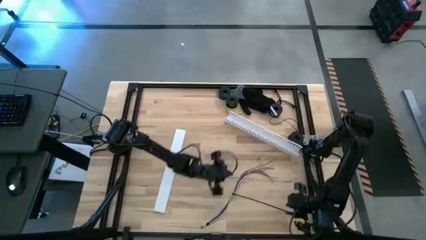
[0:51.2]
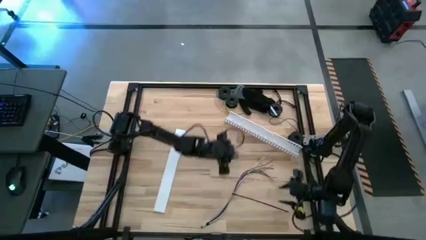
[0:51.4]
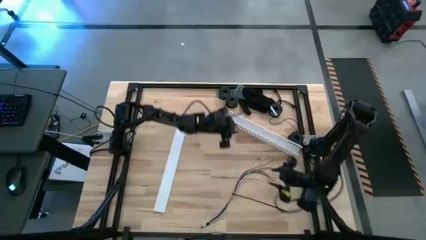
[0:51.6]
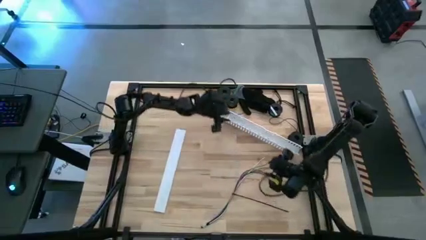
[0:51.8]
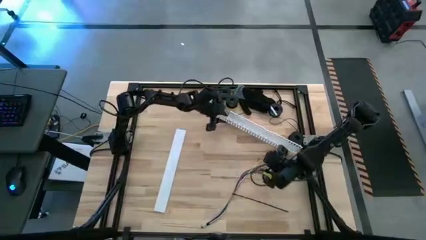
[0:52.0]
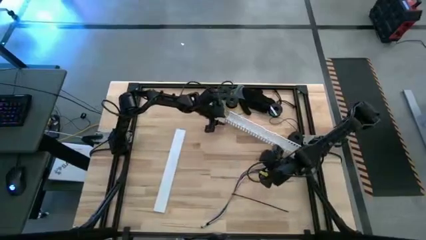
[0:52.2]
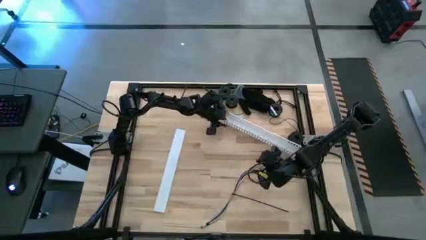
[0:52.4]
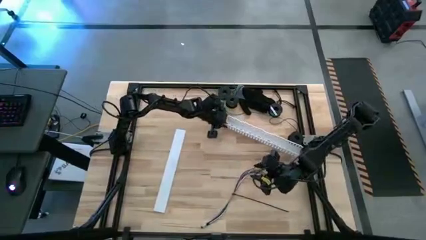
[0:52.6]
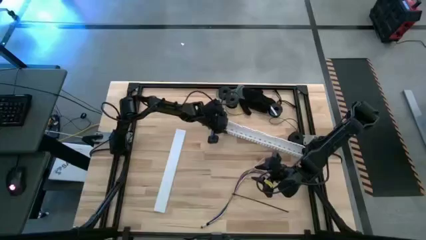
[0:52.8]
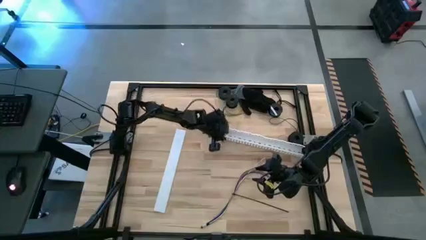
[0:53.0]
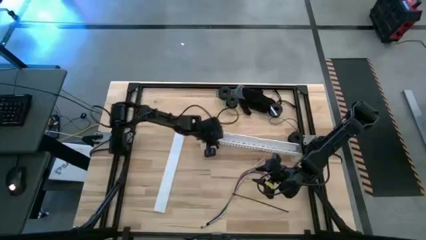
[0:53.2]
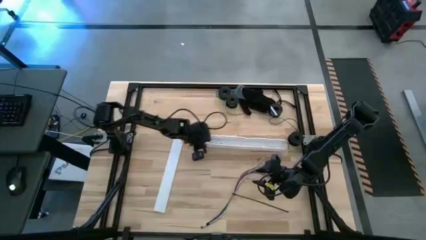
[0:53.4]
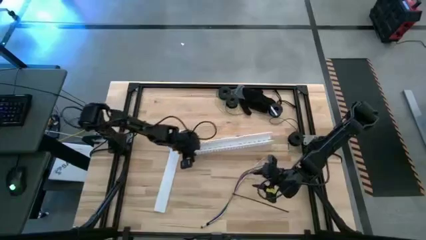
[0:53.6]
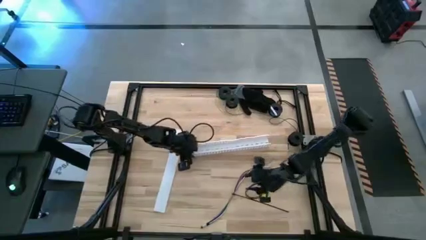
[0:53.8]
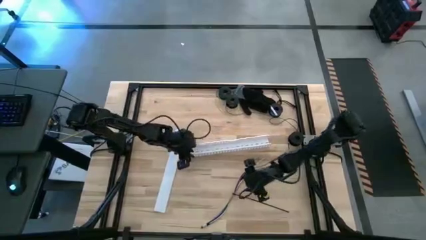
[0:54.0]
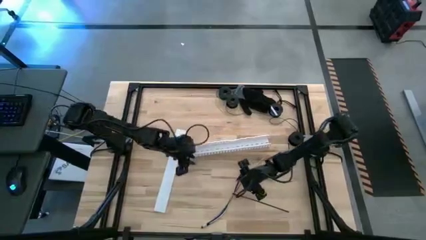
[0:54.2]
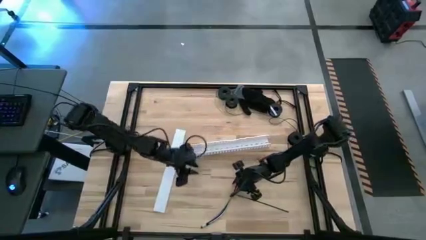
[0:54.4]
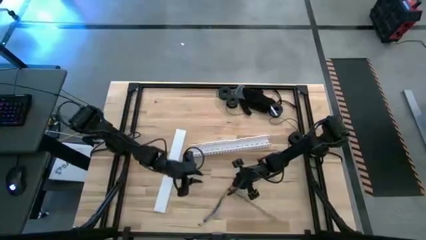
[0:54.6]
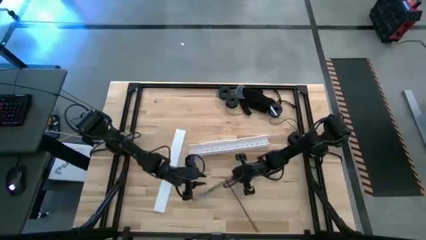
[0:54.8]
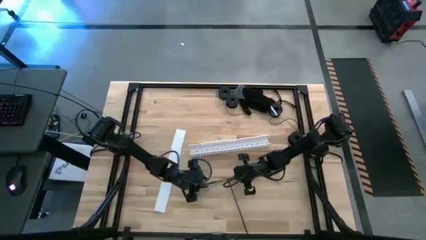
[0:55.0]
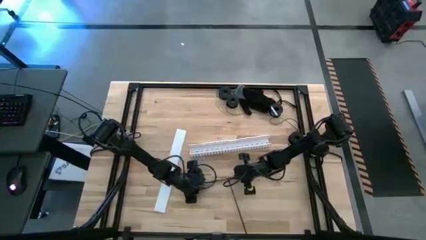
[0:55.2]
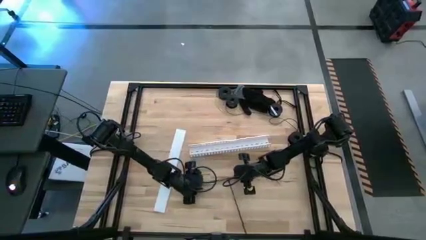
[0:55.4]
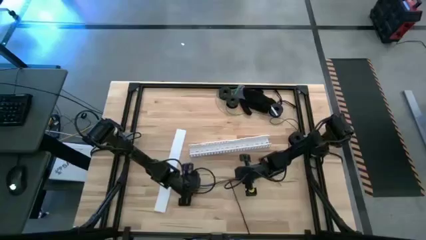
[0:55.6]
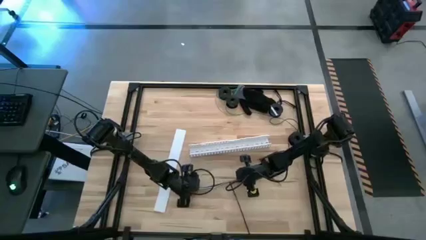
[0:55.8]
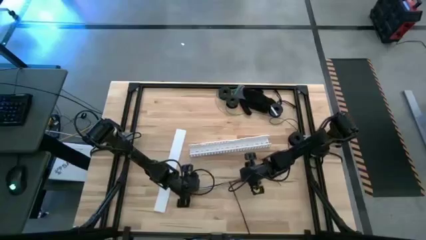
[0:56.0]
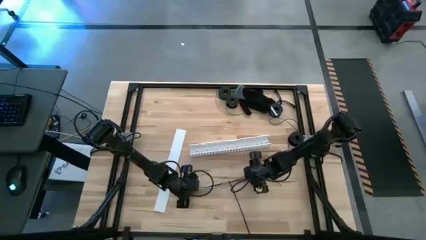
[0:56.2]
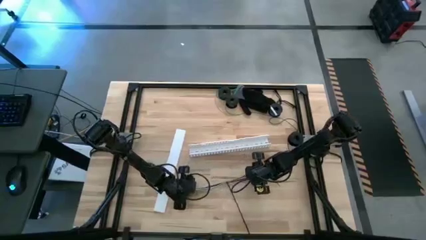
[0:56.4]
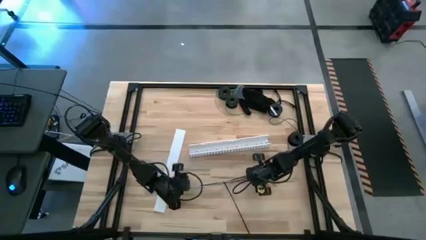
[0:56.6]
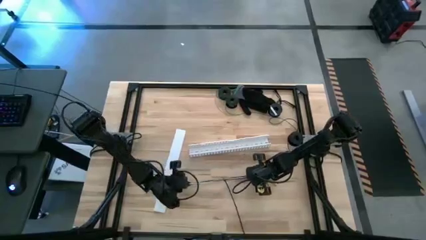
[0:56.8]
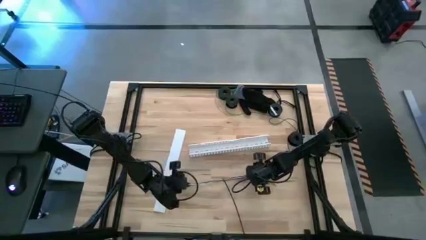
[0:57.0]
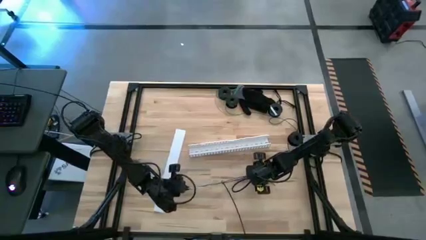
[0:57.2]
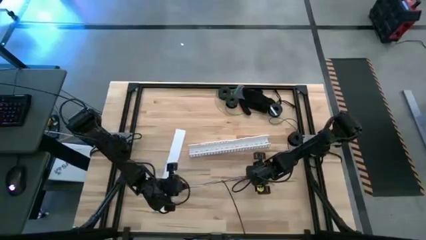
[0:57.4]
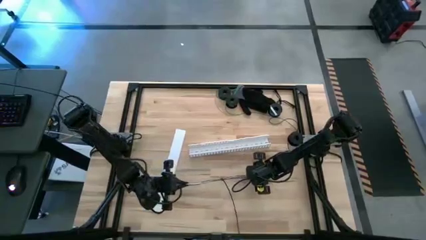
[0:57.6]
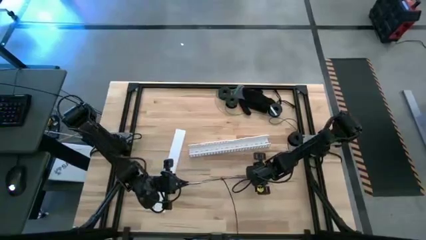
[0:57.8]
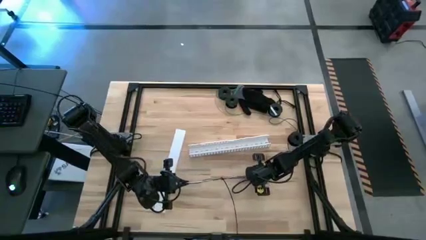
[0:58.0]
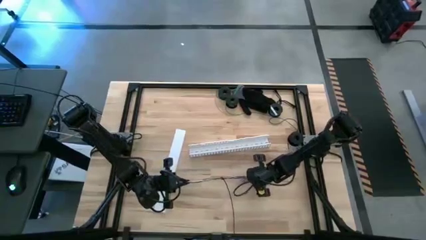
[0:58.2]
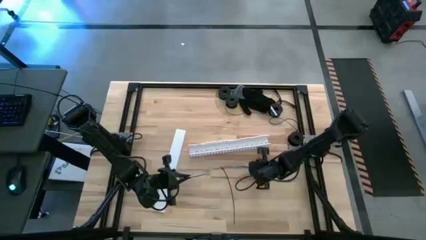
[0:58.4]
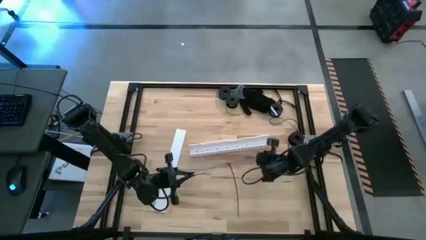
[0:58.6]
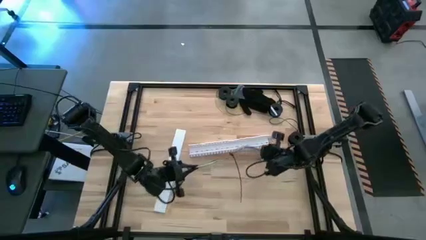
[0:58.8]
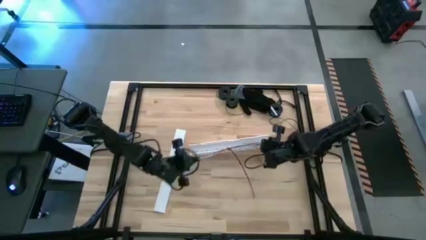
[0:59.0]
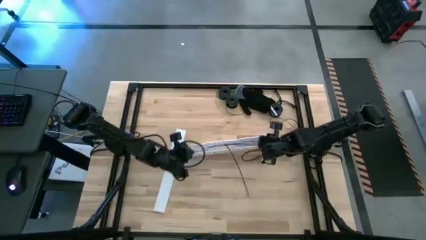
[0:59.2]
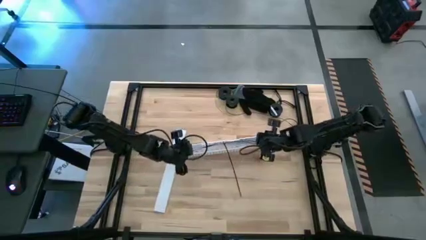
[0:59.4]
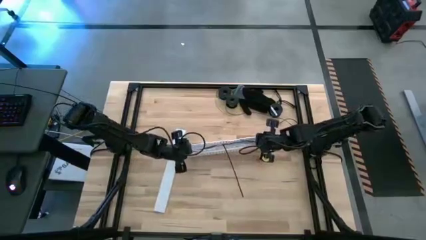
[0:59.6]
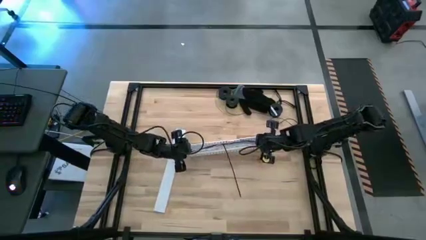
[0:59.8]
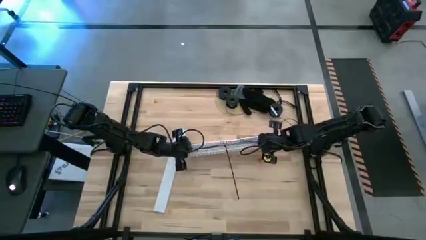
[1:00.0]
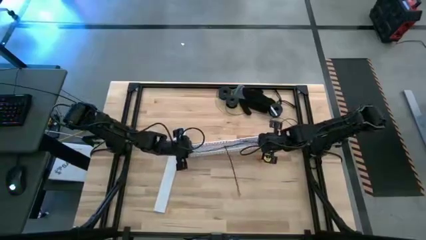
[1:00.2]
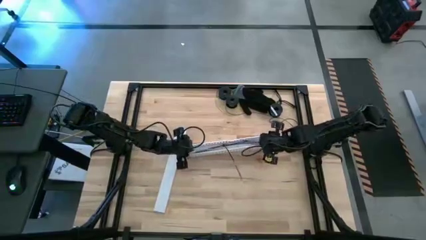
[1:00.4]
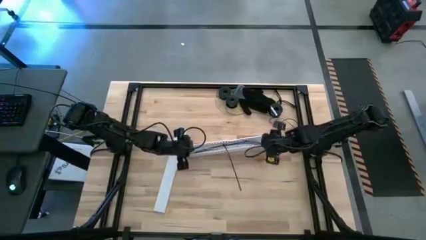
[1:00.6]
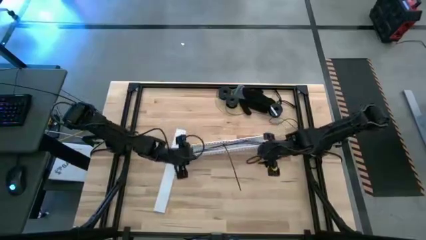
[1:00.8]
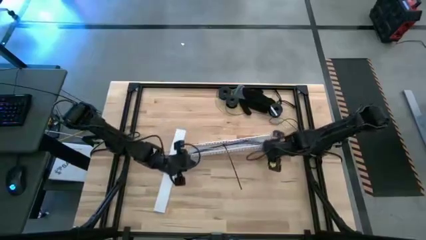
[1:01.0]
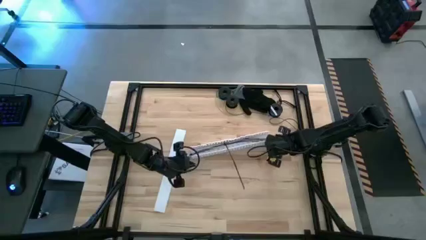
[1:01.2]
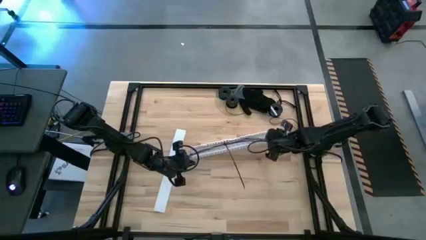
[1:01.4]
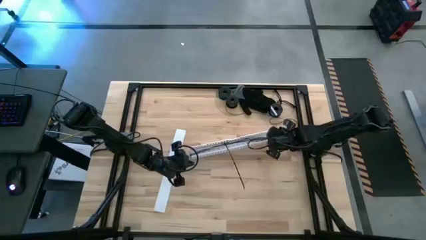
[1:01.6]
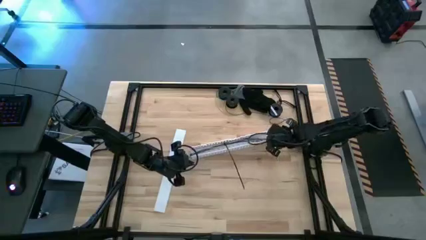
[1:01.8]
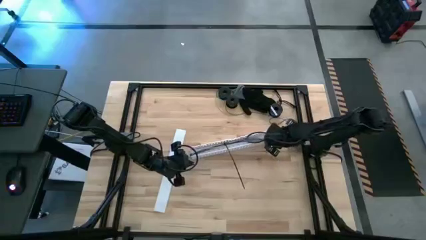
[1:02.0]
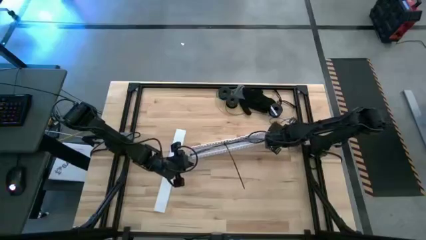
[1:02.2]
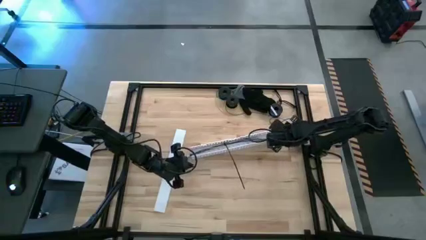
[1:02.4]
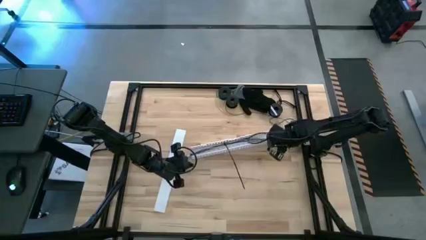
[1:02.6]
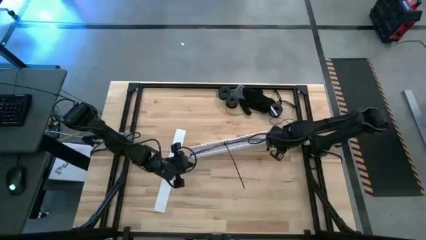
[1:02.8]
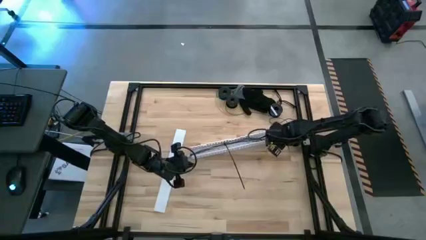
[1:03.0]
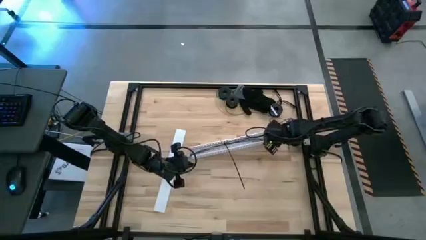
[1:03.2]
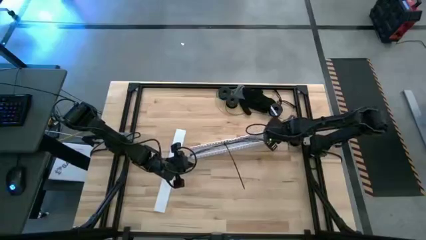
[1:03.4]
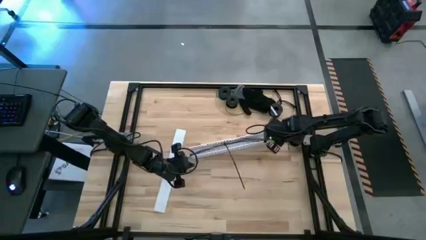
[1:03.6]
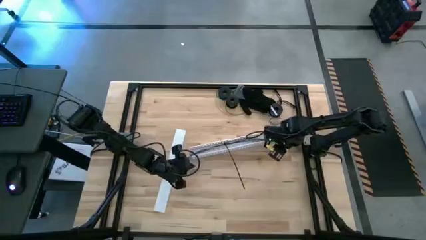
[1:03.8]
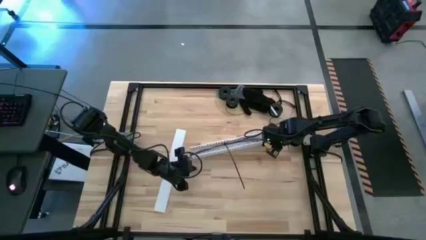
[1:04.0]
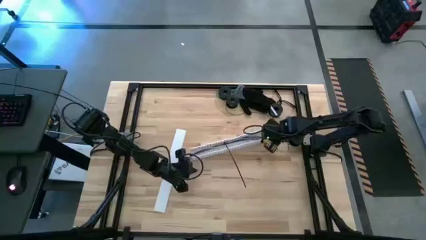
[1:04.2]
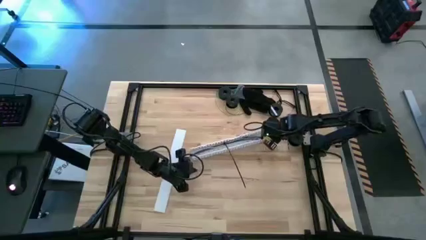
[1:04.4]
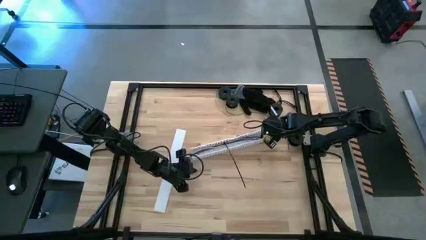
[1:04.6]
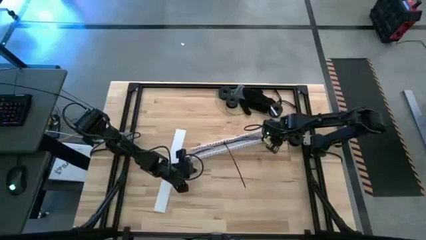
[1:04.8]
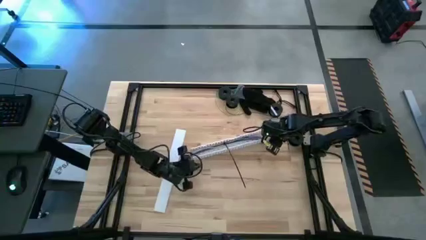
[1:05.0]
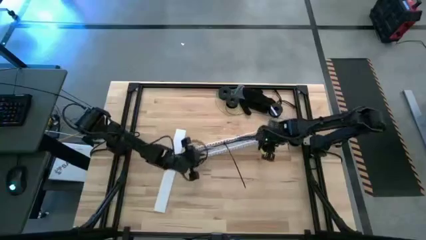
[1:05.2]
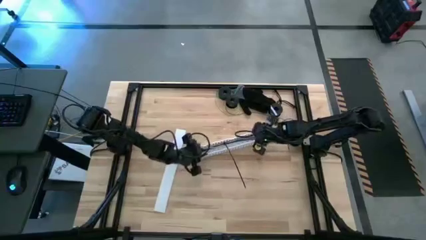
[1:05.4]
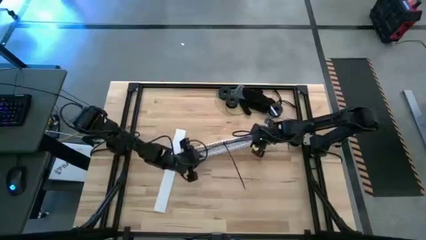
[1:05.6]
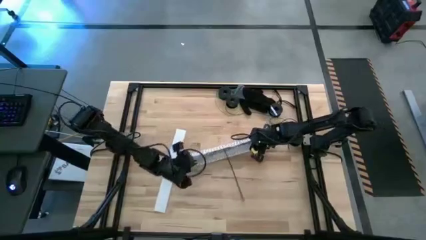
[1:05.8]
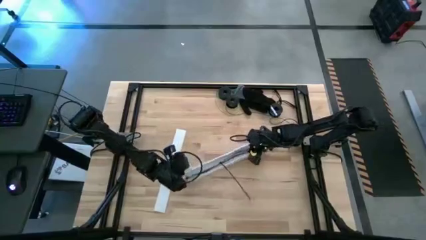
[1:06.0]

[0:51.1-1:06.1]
Task: Ziptie cables
Put the zip tied cable wires to the white cable duct

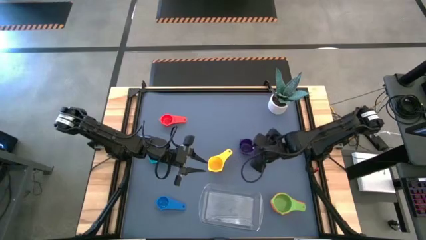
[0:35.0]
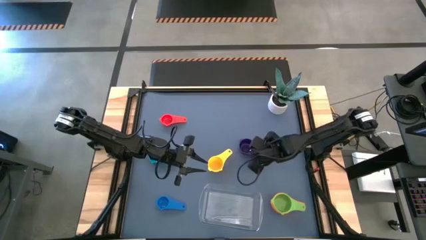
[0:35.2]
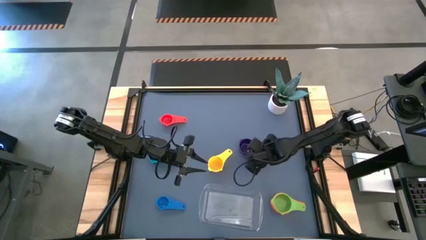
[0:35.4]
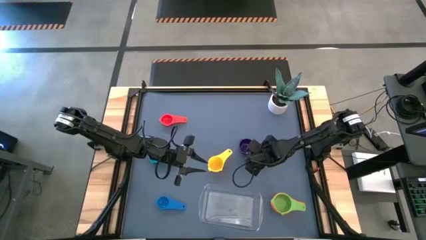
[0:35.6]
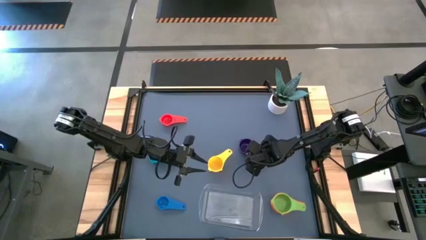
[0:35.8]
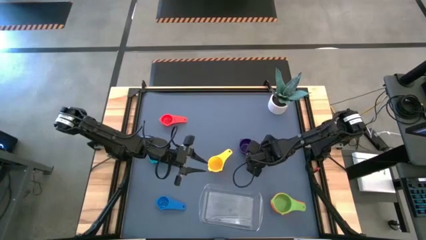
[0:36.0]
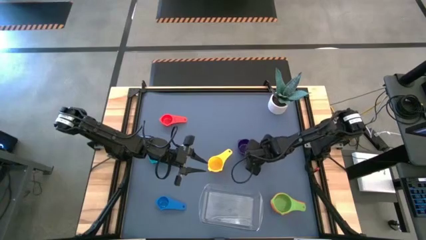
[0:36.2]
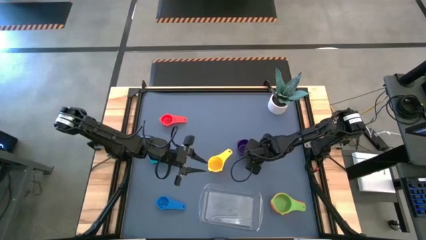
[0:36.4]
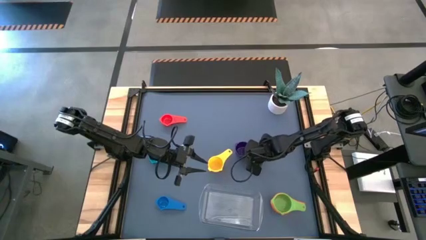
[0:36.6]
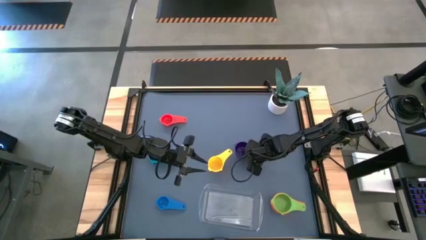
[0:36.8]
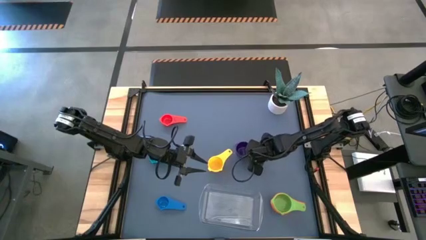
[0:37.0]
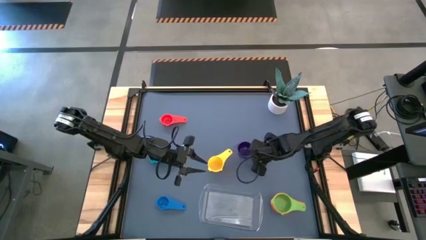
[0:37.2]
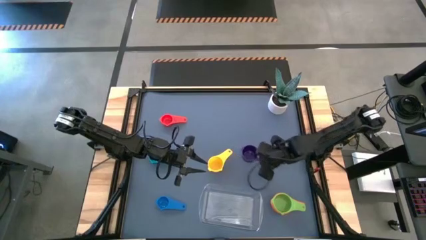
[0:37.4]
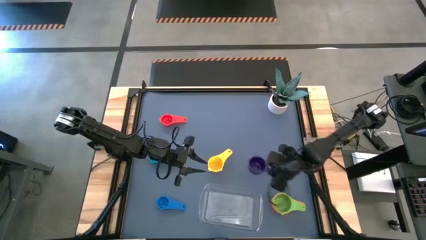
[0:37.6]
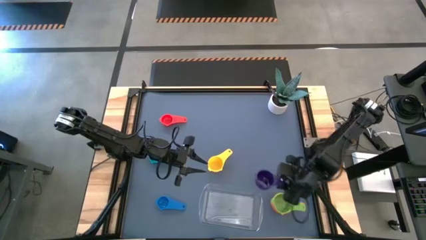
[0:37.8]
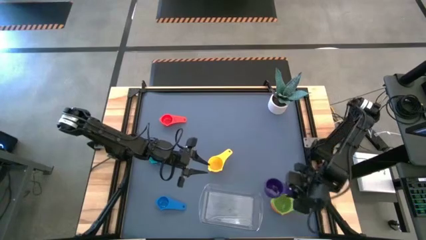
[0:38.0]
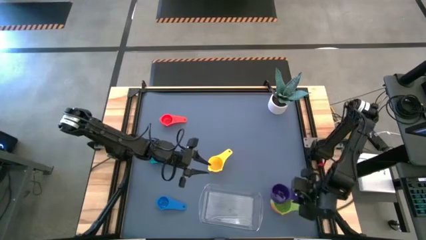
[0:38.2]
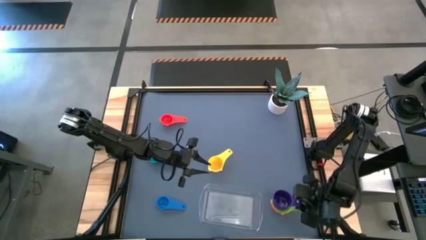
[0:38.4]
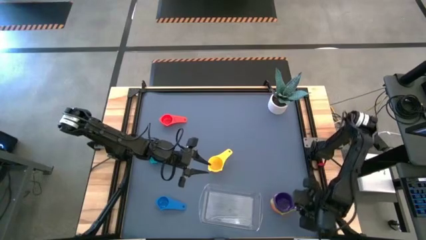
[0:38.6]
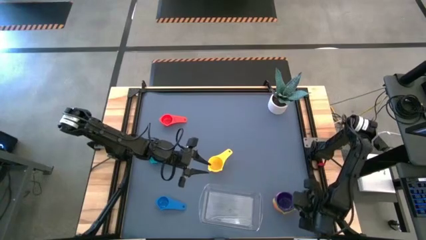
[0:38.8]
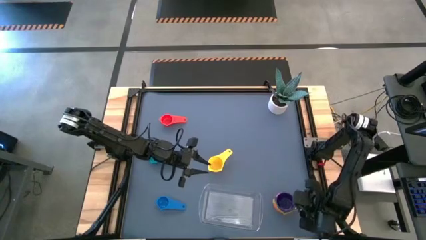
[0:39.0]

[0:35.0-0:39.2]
Task: Nest measuring cups in basket
Stack the violet measuring cup on top of the green measuring cup
